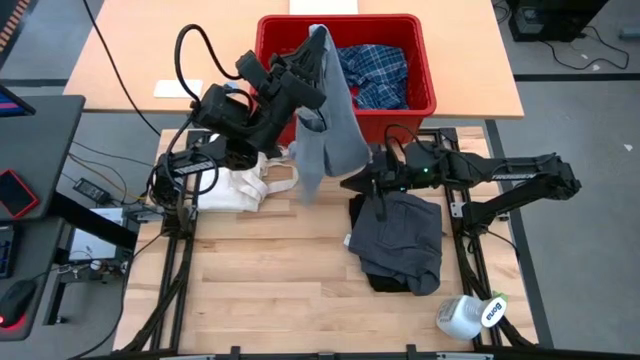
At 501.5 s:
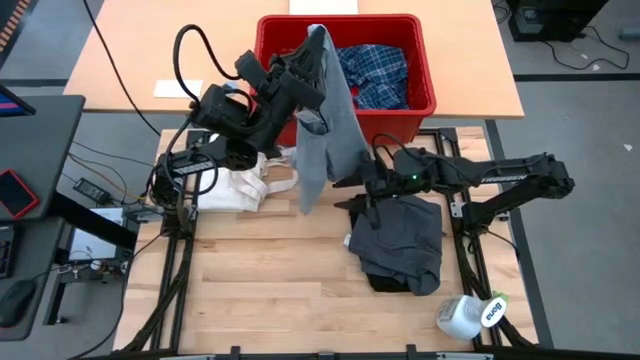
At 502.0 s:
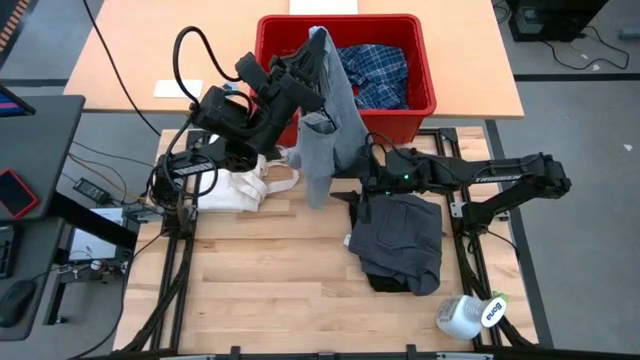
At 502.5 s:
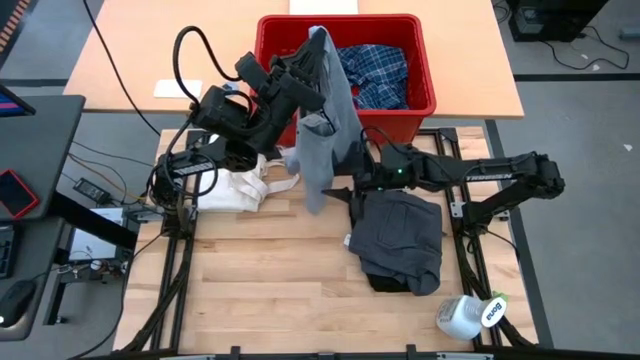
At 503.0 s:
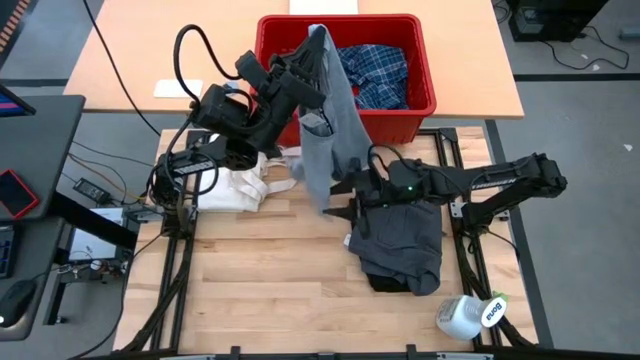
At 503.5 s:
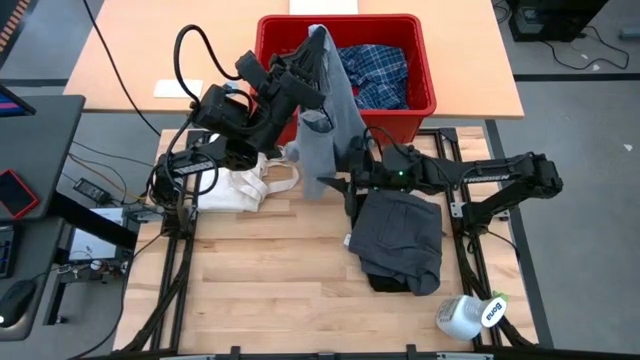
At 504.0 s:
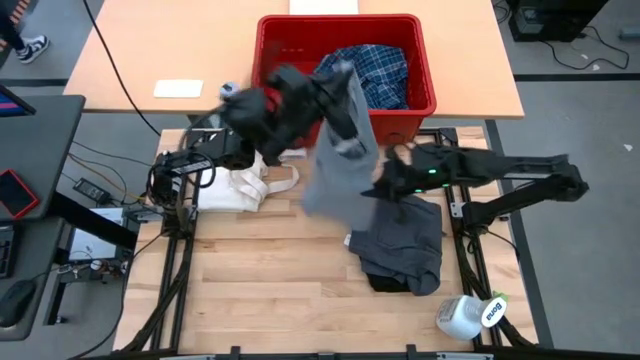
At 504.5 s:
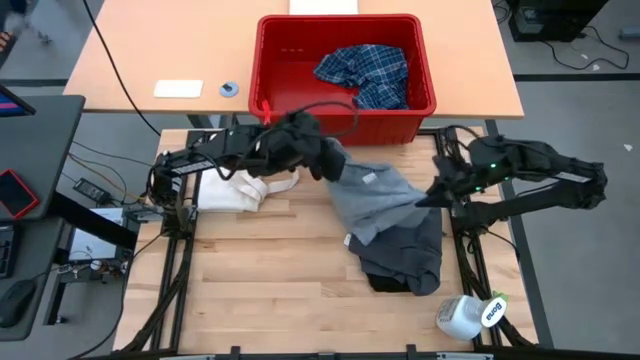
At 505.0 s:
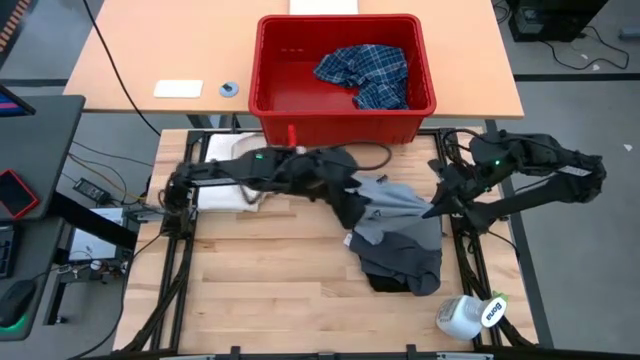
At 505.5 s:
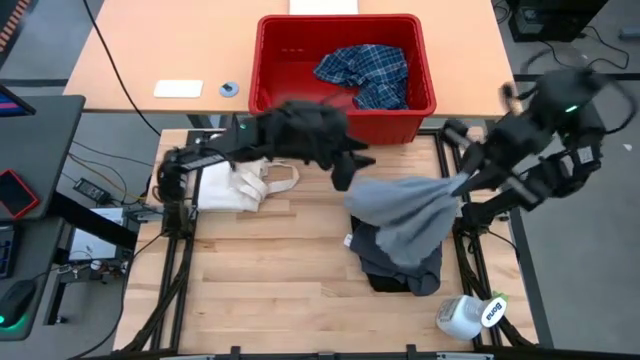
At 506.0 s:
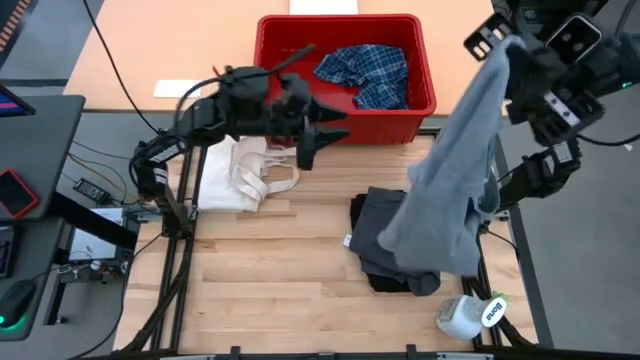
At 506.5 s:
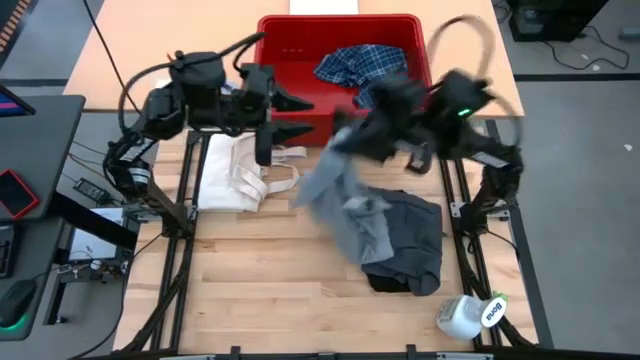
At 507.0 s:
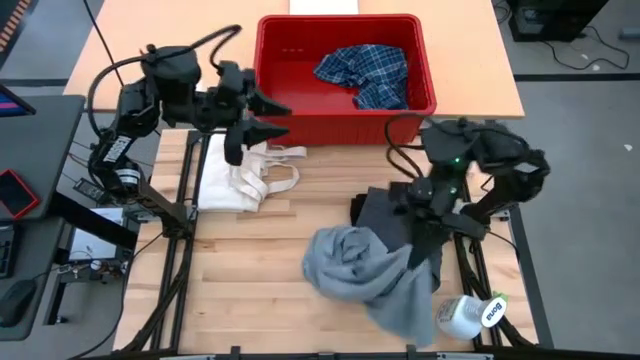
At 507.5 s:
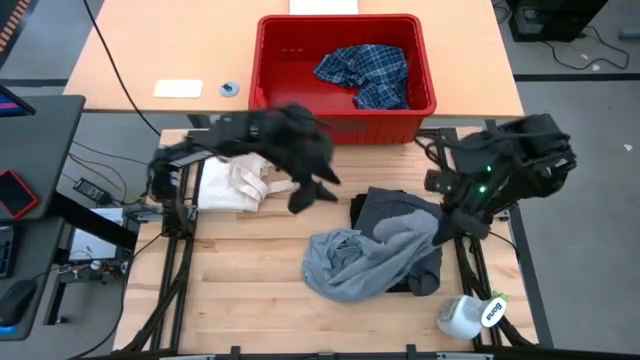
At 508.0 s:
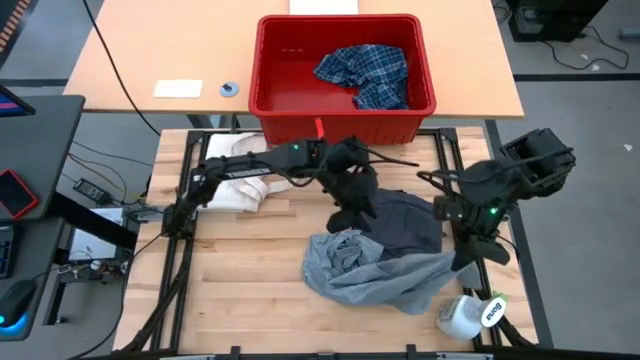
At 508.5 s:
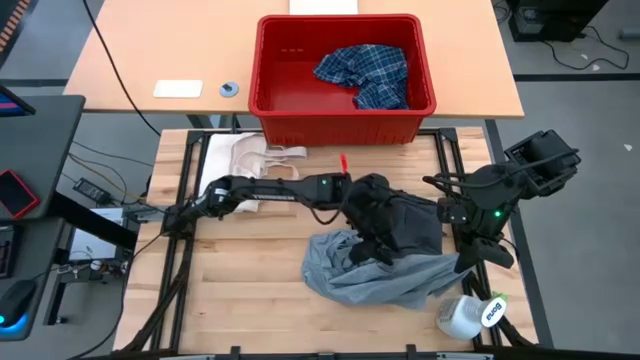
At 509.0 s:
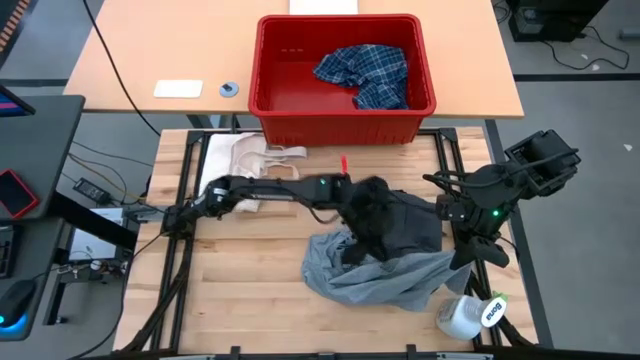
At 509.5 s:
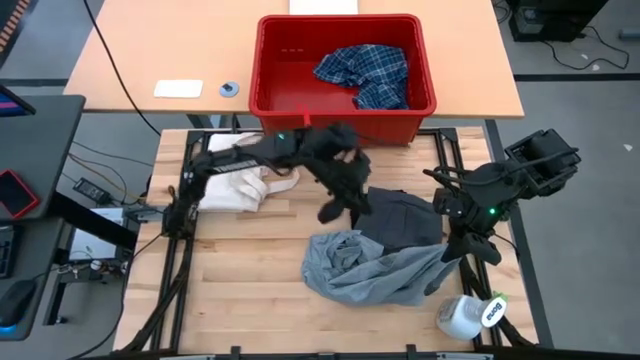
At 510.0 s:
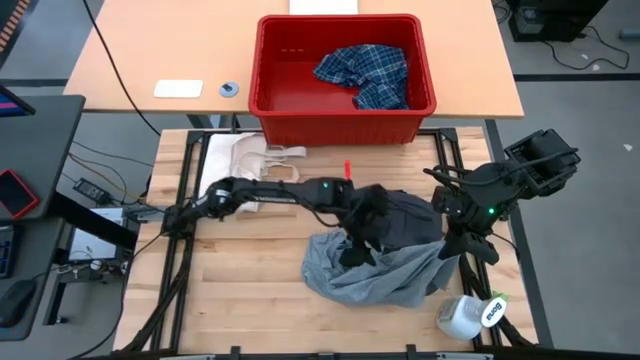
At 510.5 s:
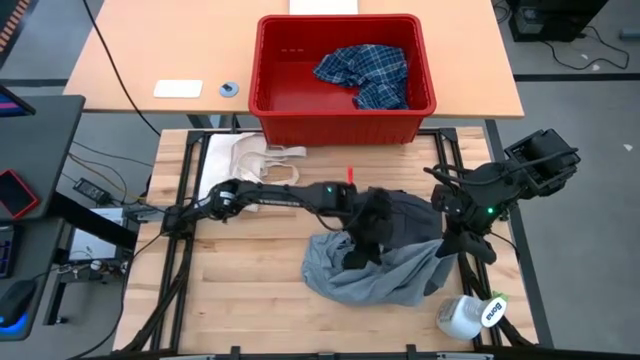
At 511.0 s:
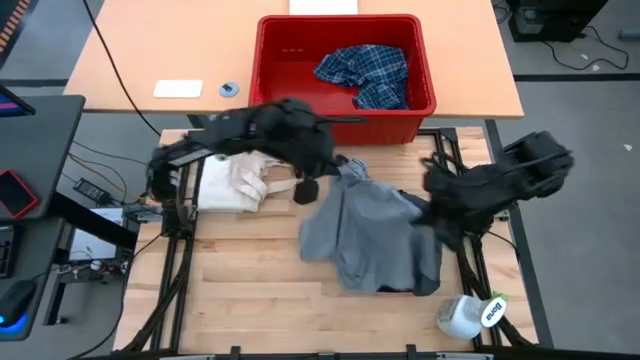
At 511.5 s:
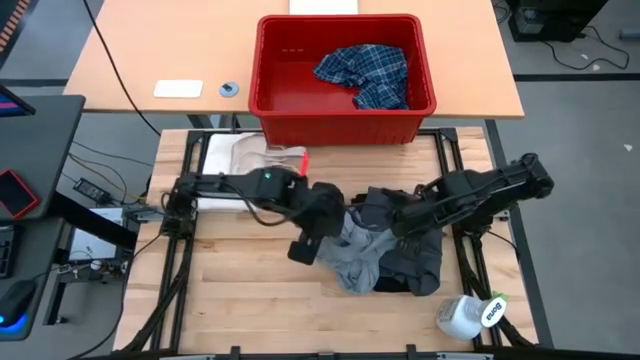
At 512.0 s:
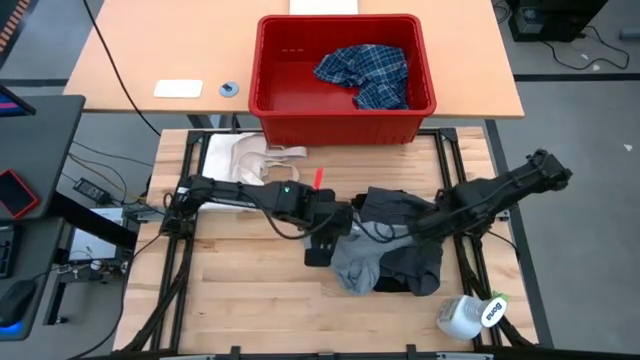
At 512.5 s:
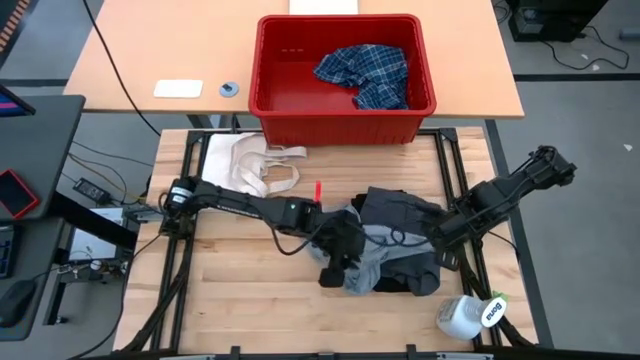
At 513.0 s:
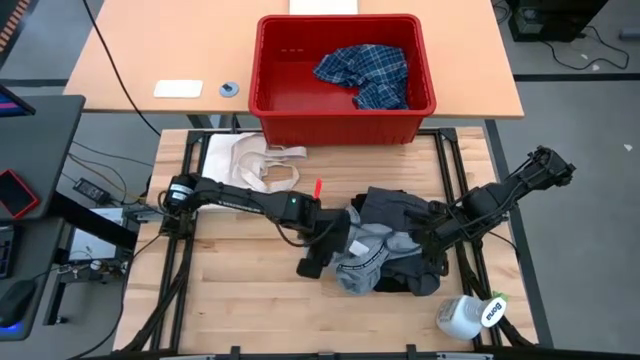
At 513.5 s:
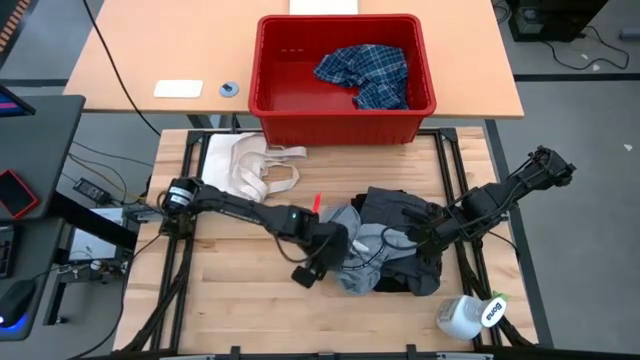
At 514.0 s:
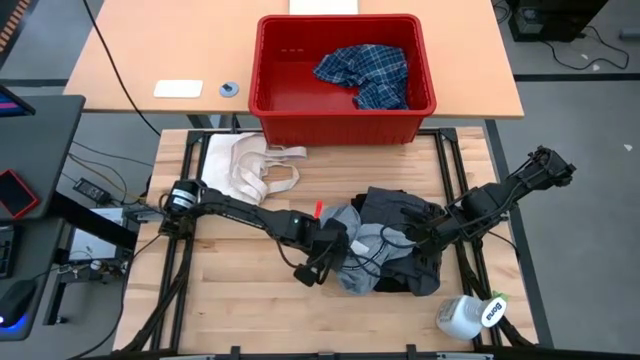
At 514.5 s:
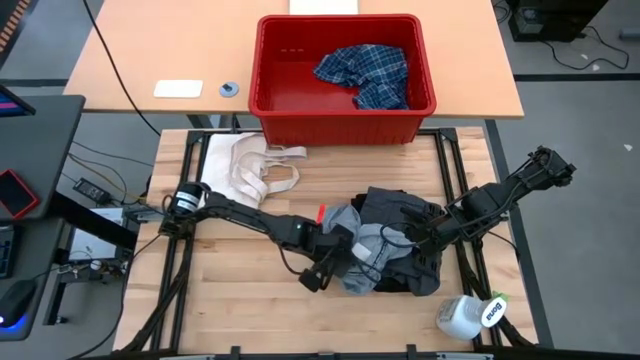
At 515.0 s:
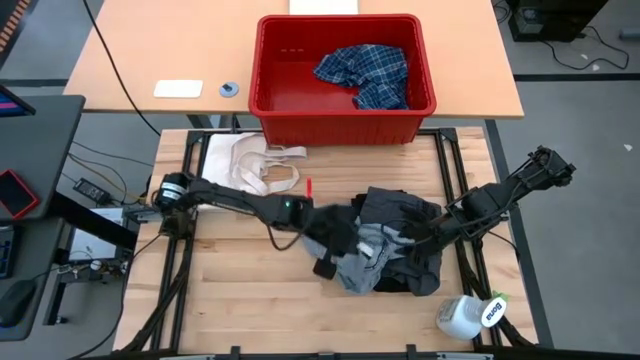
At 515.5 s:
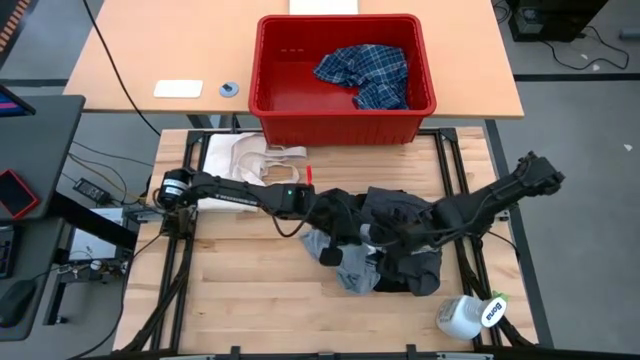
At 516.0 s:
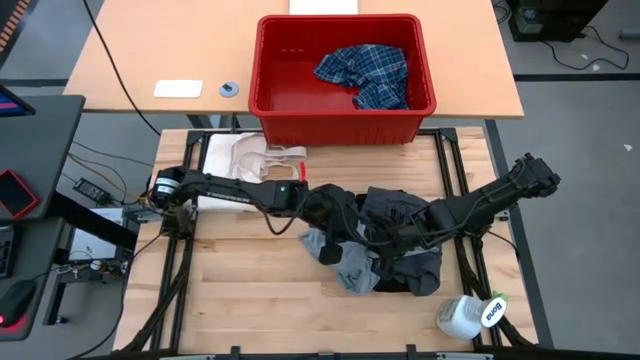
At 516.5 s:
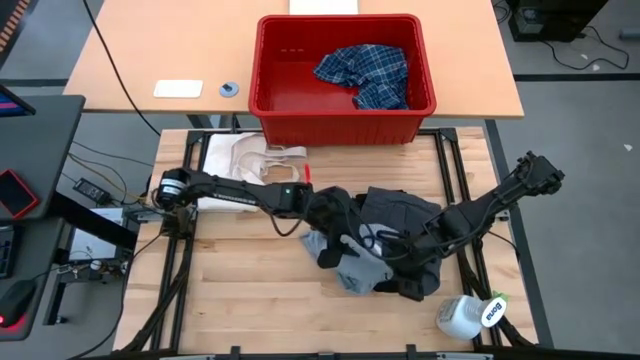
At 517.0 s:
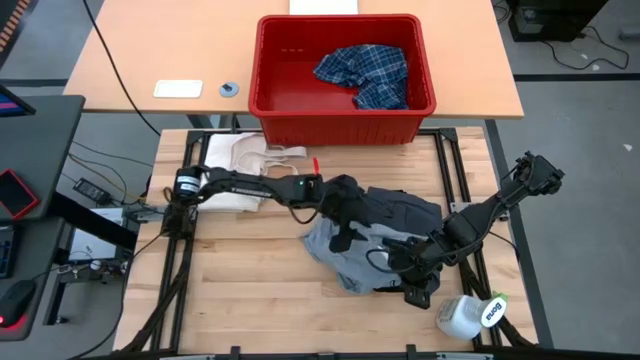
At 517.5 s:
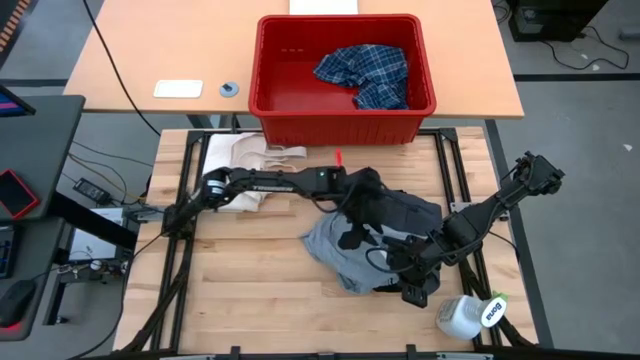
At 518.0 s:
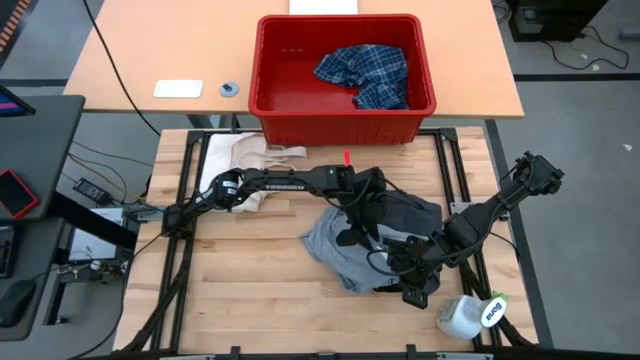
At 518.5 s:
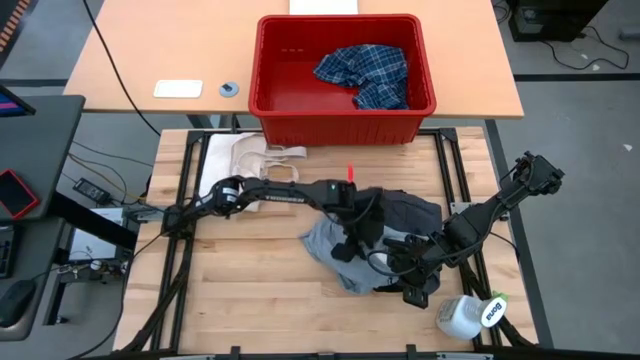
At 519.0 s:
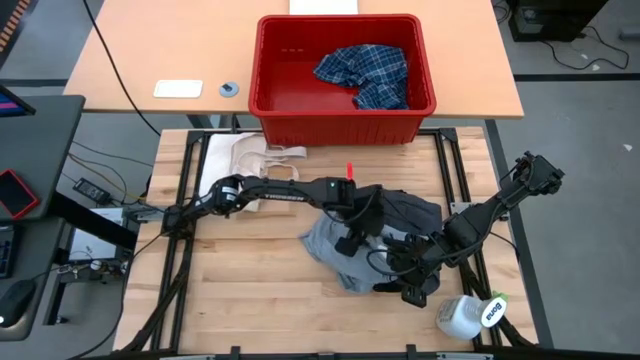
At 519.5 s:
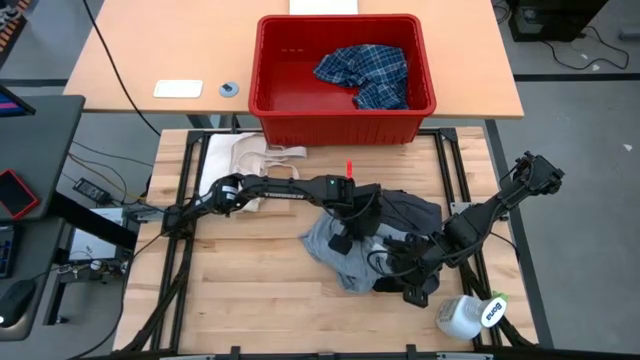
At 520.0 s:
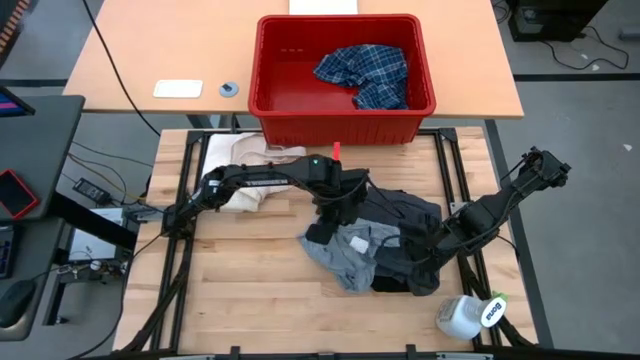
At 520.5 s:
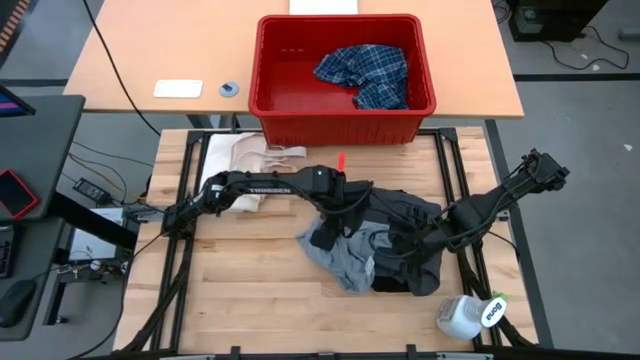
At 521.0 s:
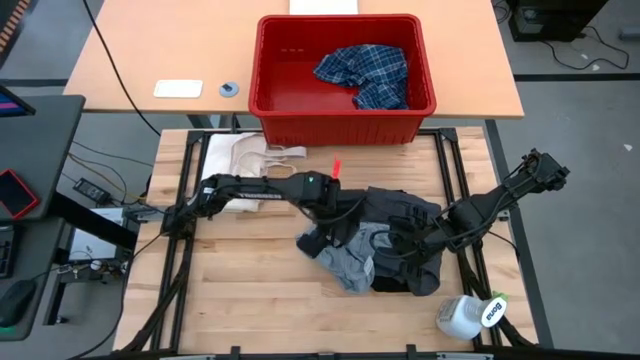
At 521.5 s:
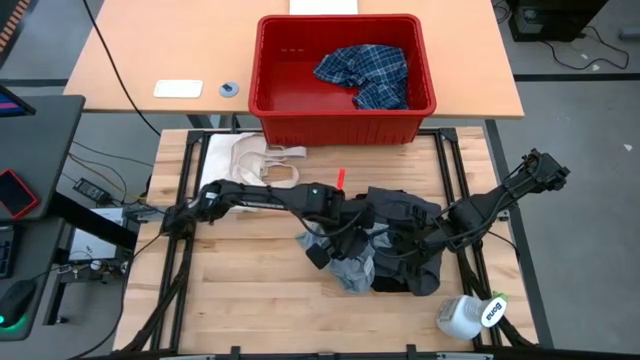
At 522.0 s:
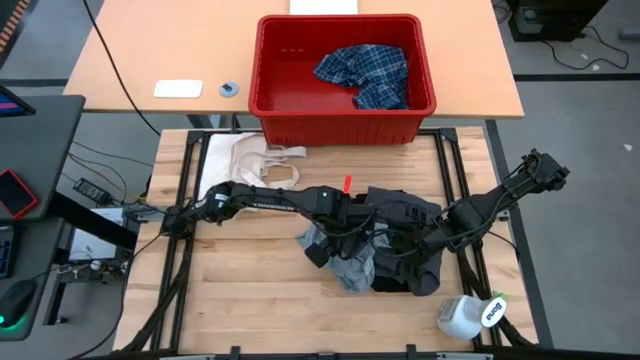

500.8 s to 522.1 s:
Task: Fold Laundry from Bin
Fold the gray shirt
